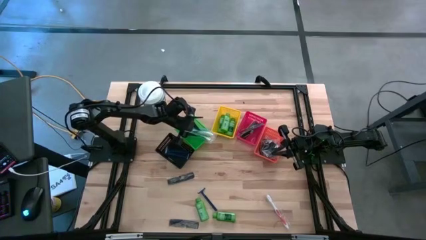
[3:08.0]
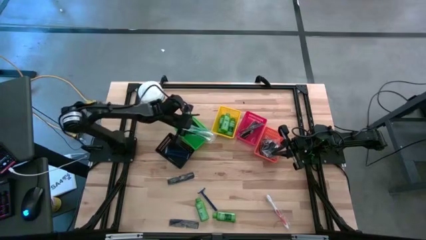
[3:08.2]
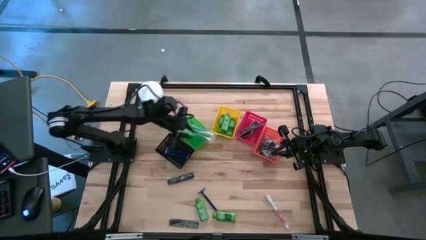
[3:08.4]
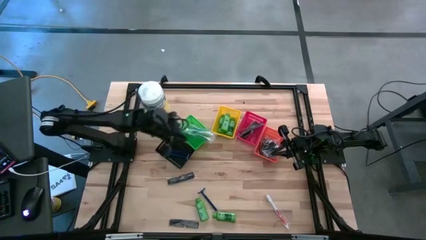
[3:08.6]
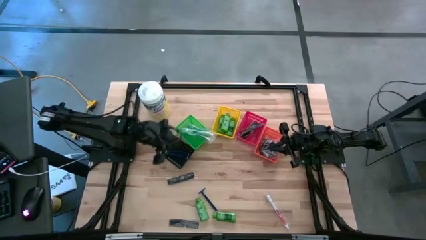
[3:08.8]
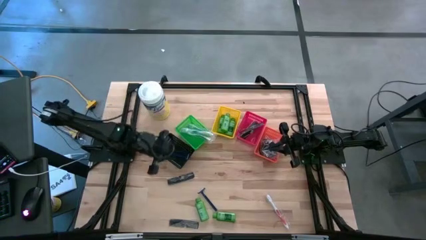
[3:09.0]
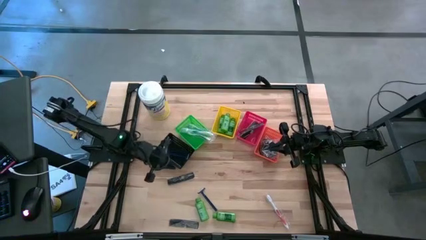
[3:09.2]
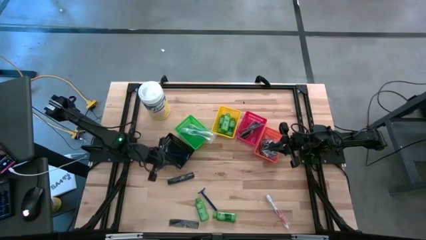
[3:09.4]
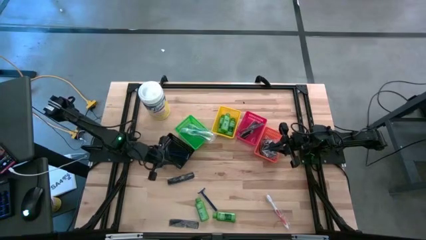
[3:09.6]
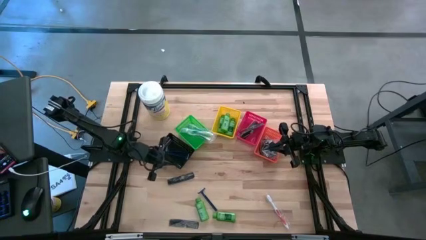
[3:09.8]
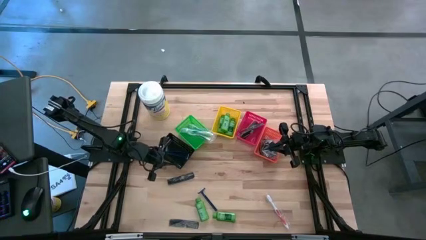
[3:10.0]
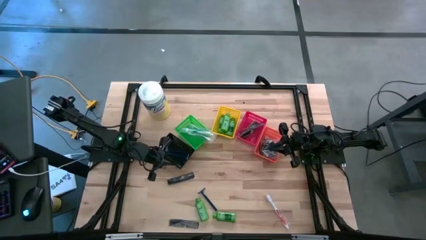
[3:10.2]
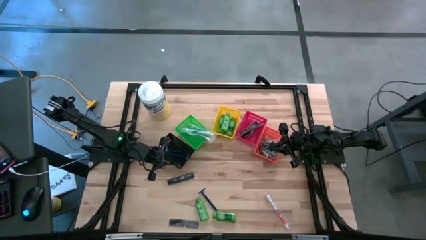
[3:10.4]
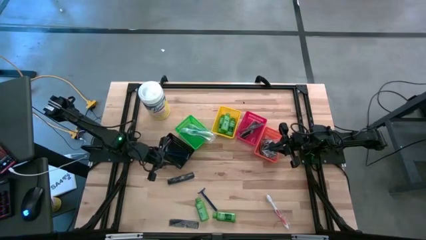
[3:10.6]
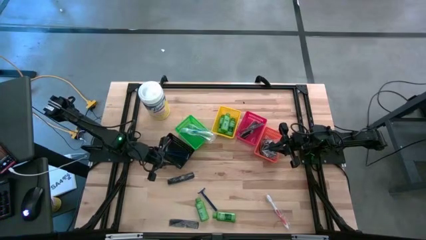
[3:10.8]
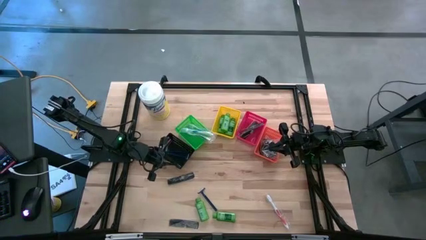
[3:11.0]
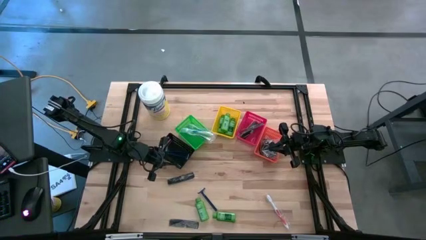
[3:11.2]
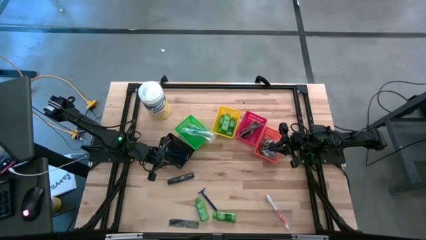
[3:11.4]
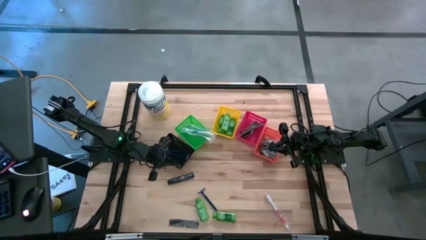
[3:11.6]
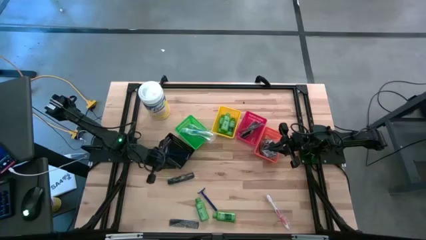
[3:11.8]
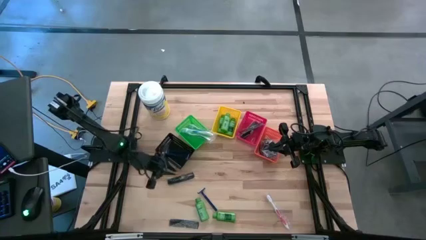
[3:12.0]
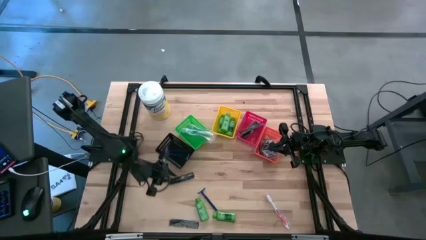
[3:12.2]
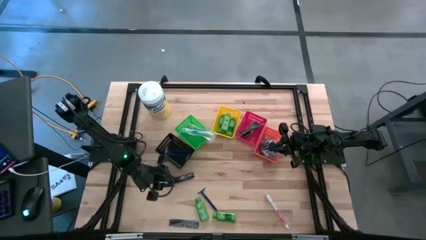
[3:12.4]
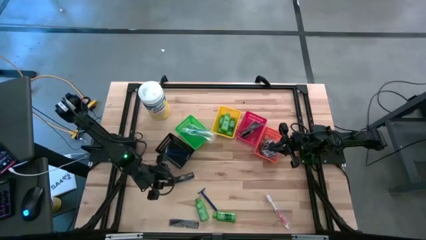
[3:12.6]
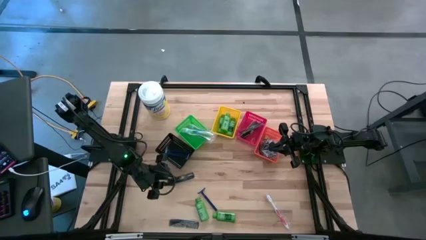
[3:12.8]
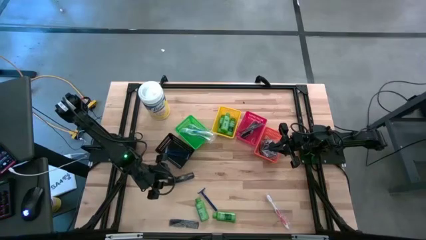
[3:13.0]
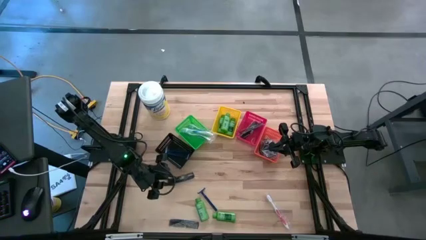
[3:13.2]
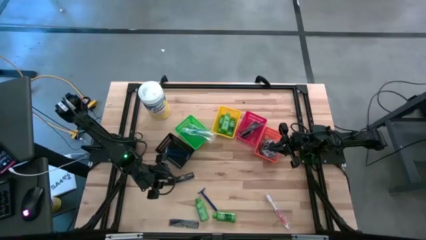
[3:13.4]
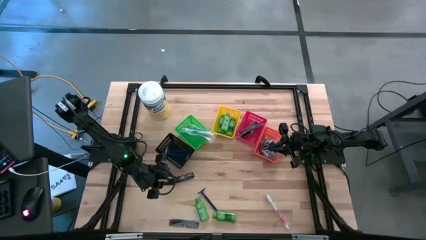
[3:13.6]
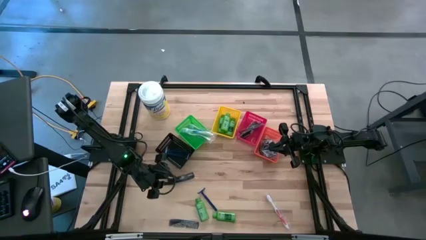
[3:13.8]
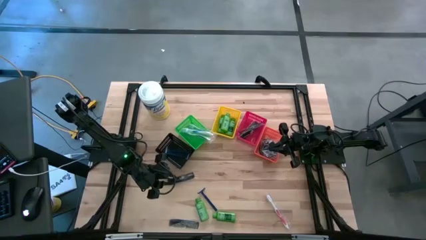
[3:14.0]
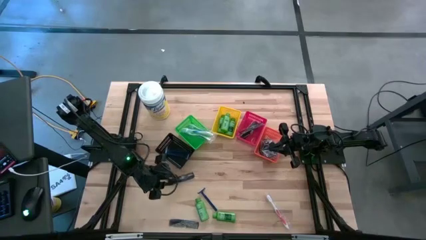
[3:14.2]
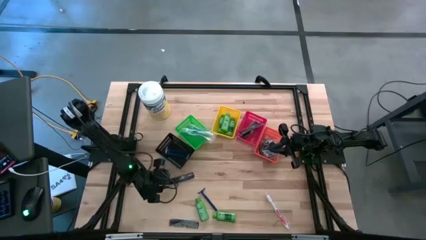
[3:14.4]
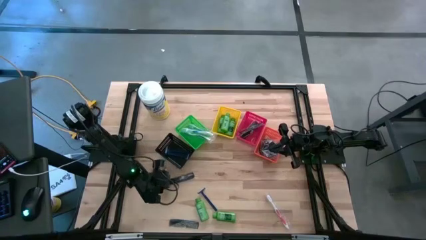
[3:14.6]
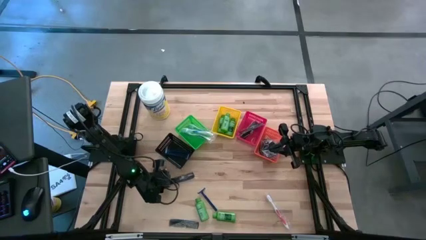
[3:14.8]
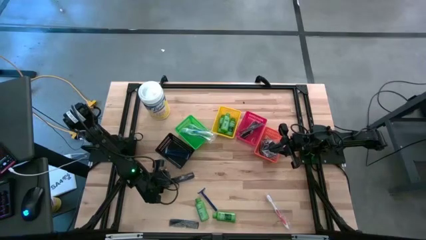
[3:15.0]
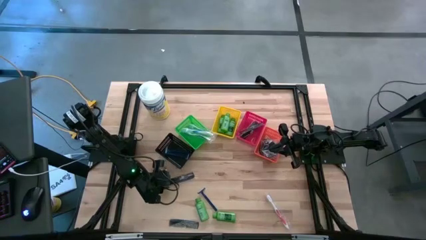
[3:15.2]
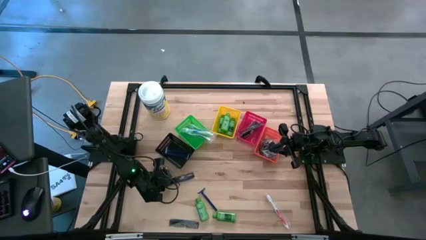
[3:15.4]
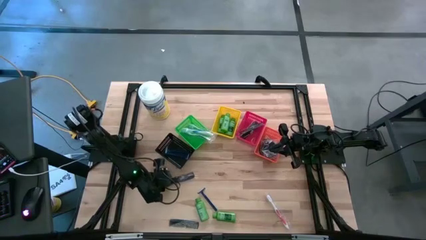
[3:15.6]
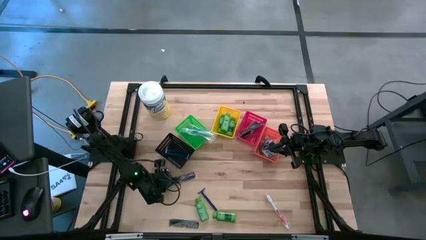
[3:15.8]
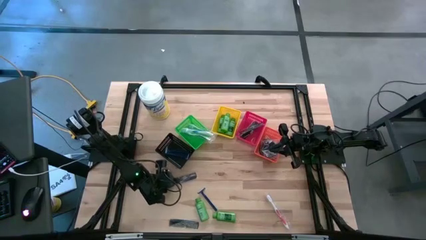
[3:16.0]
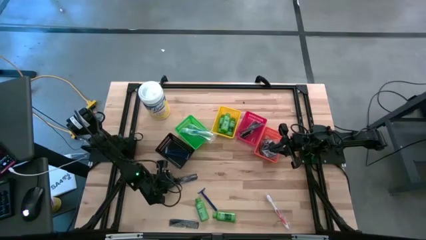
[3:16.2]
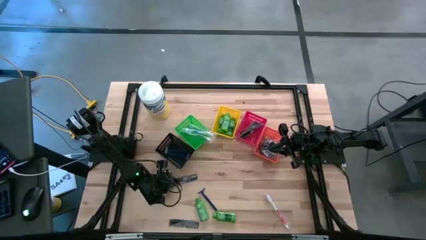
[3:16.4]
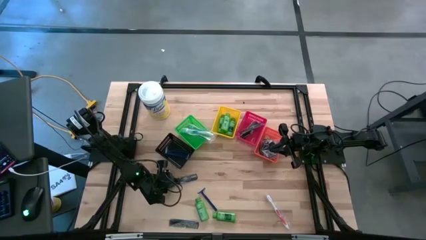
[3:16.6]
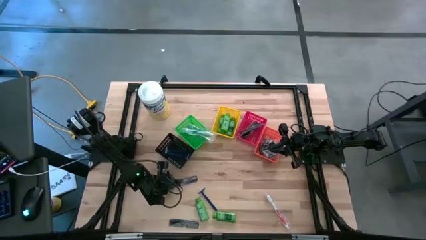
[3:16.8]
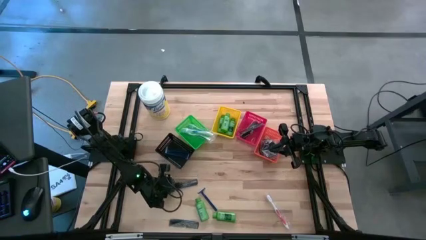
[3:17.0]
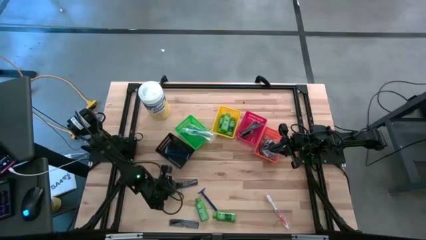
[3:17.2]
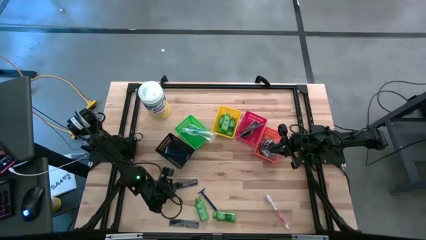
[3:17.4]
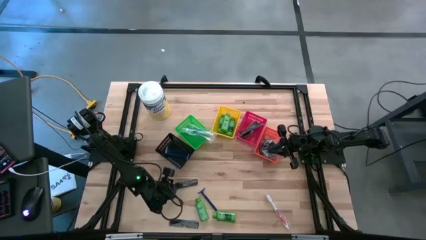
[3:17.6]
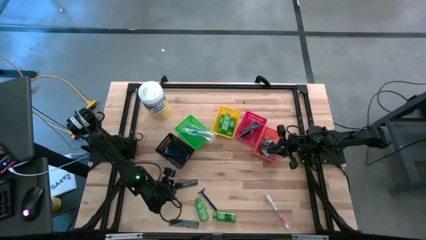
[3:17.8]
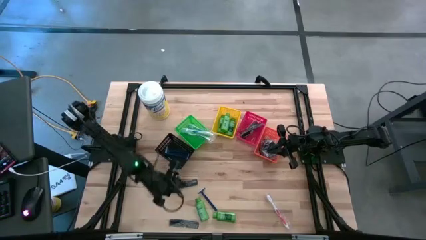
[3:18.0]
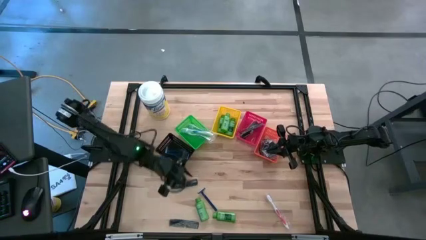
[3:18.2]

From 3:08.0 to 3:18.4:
Task: Pick & Place Travel size toiletries
Put the blue razor into the black bin

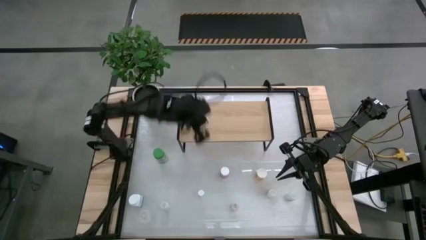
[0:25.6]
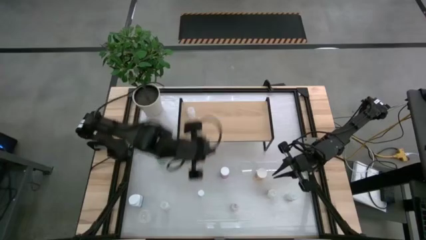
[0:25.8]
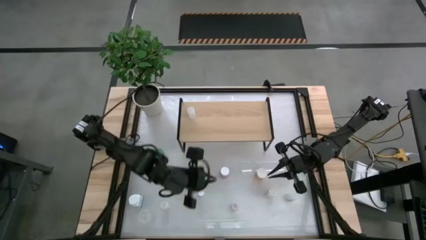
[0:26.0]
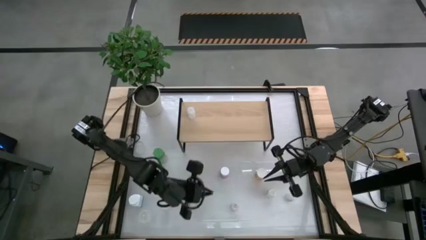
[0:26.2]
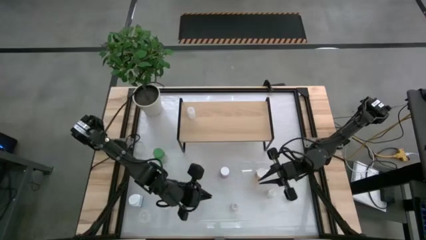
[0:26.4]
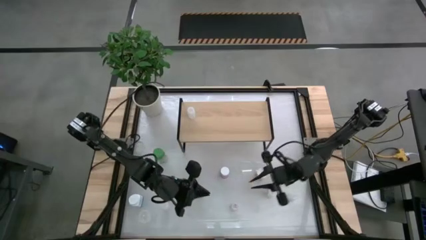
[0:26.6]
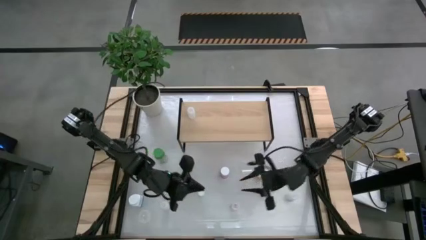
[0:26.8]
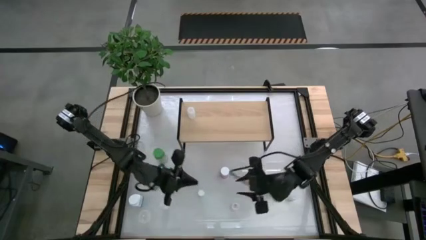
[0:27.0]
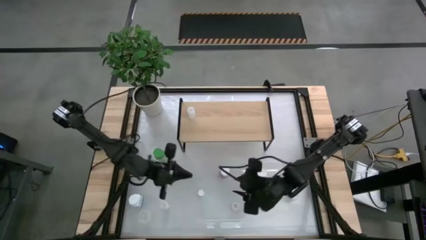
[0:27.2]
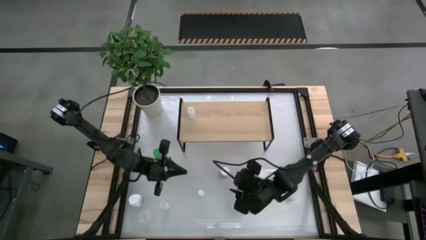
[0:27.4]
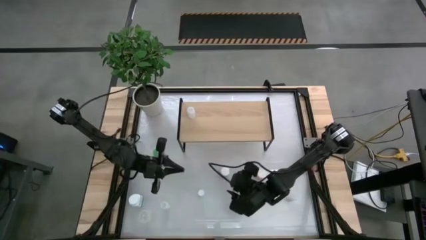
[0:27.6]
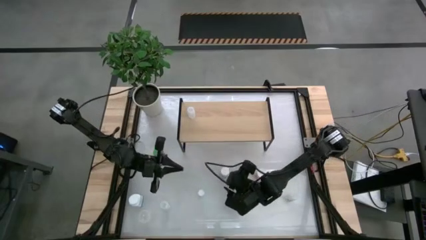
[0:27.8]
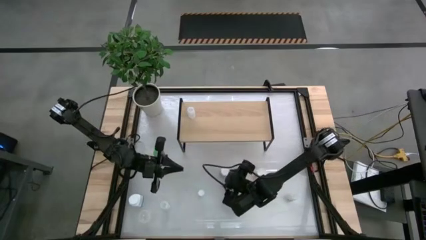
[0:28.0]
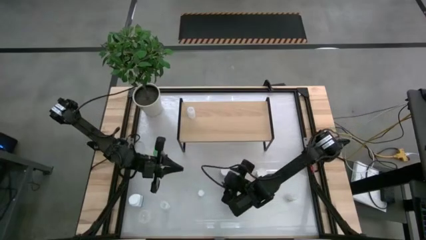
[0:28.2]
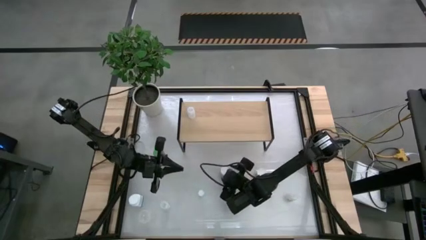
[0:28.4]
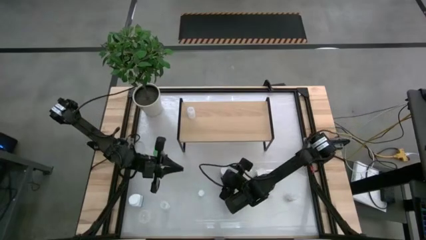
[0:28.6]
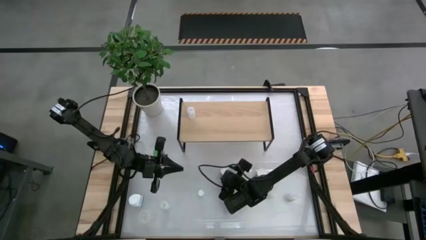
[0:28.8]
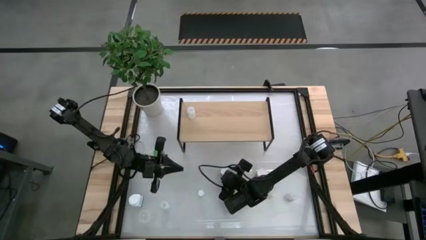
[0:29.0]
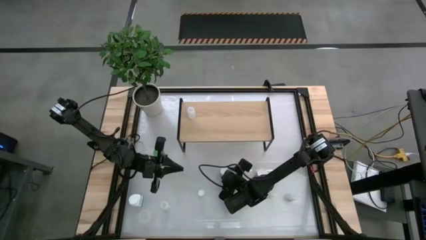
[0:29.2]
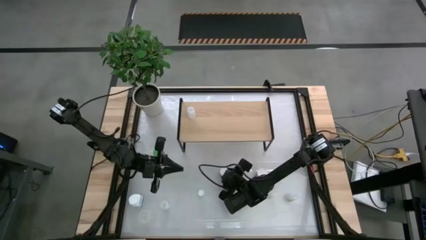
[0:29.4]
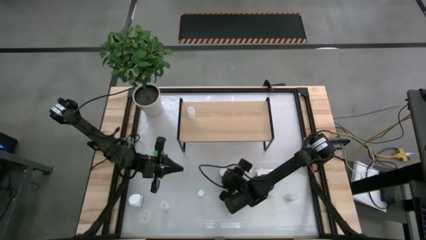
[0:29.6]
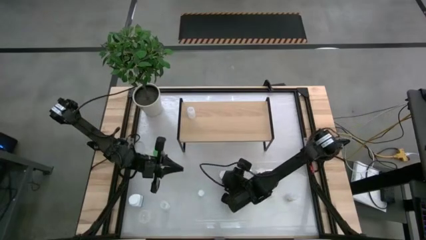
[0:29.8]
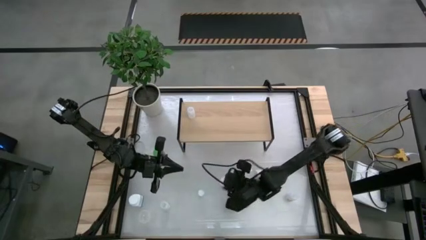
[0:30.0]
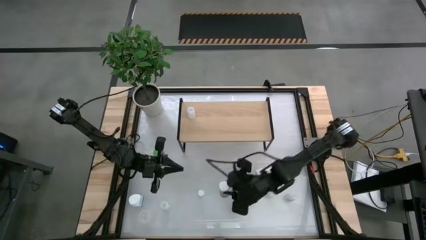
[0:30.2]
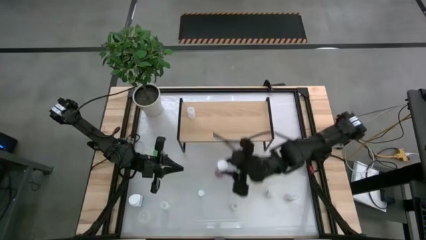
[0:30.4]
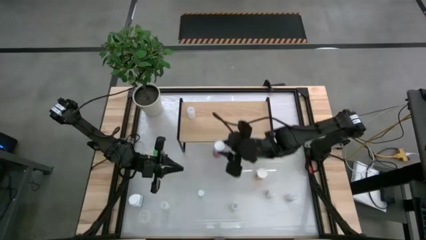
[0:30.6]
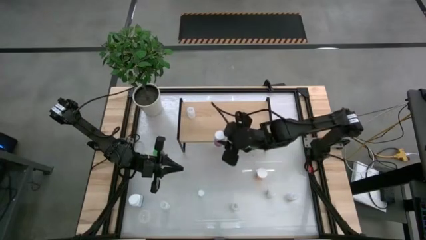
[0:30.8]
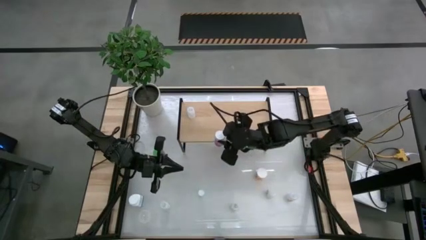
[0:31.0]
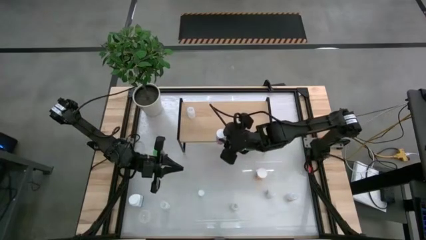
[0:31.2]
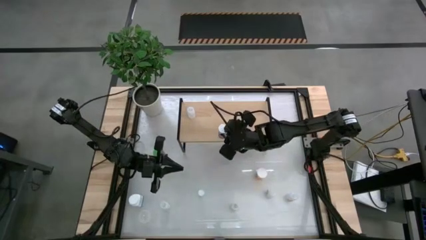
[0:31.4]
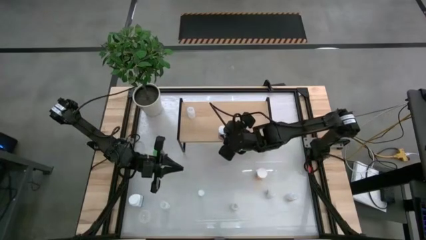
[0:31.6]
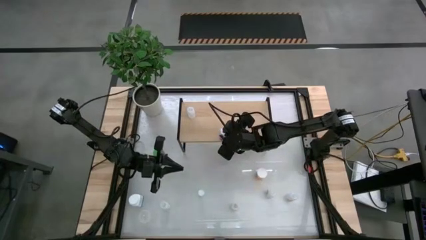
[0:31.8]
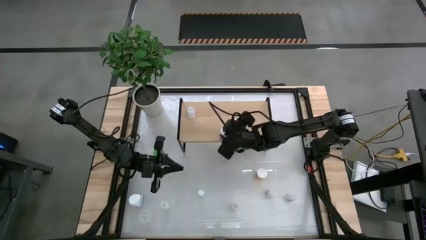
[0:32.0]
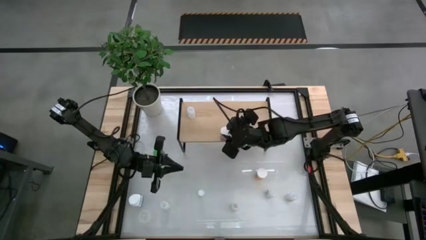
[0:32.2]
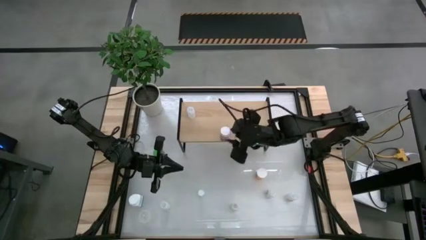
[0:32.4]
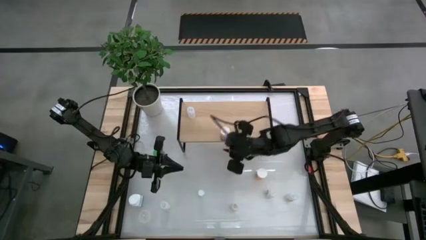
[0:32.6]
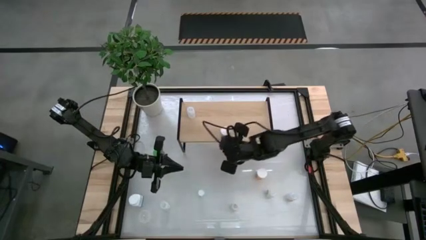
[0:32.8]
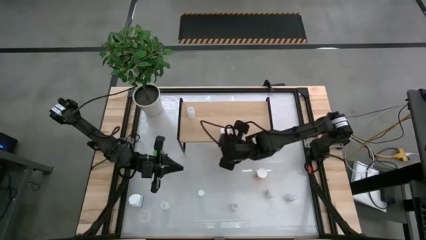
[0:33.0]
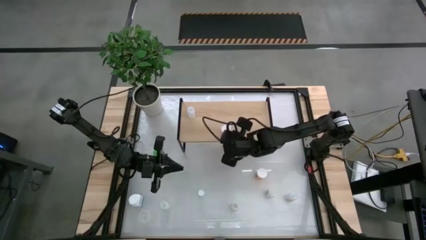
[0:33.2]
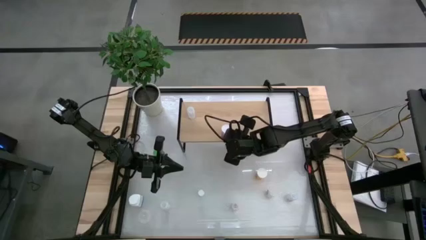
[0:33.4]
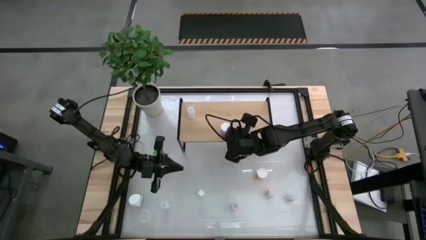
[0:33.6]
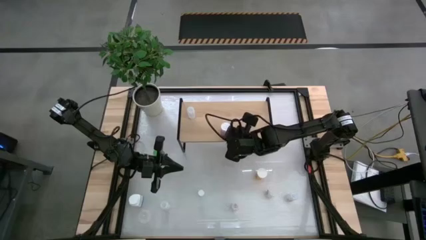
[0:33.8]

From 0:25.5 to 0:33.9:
Task: Pick and place medicine bottles onto shelf by color
Put the pink pill bottle on the shelf
